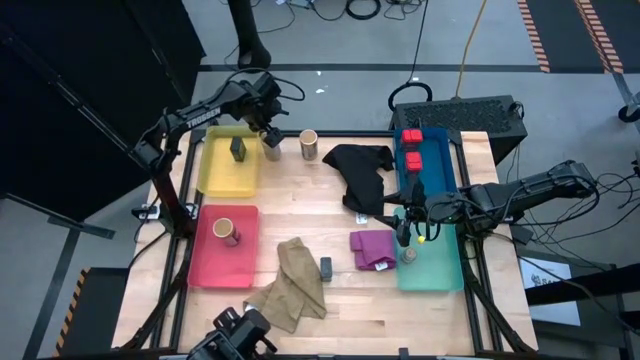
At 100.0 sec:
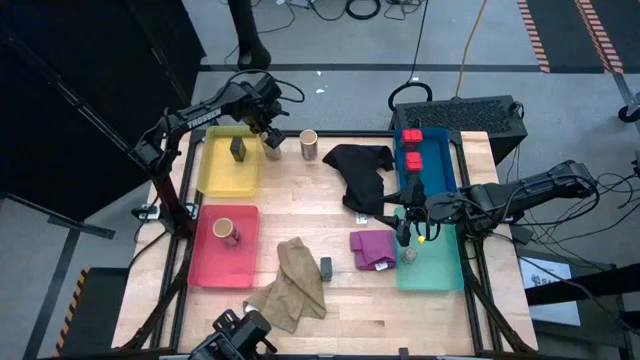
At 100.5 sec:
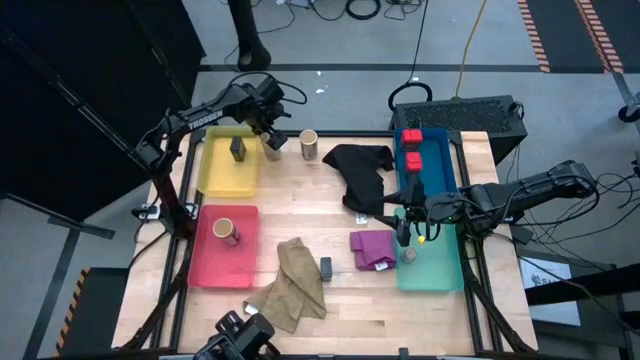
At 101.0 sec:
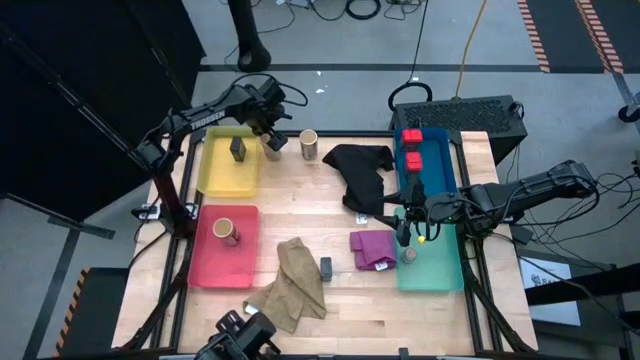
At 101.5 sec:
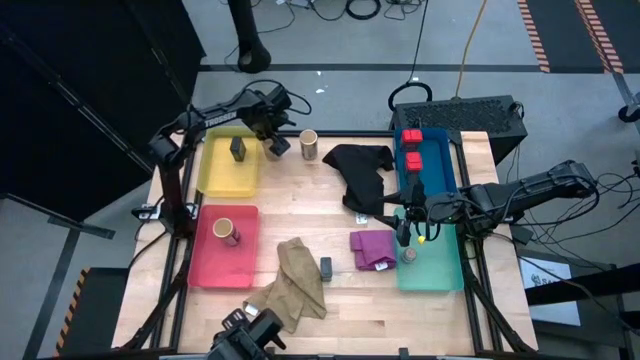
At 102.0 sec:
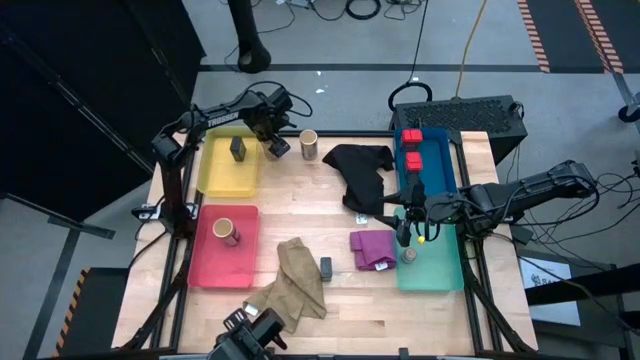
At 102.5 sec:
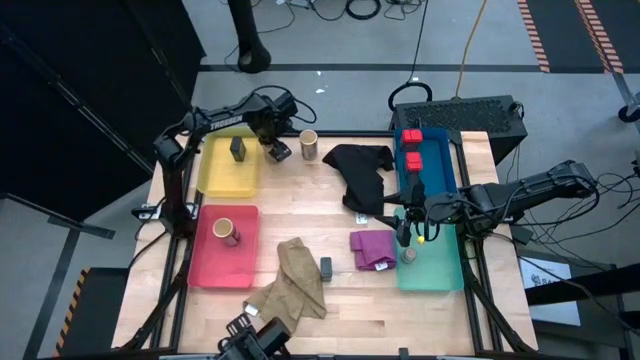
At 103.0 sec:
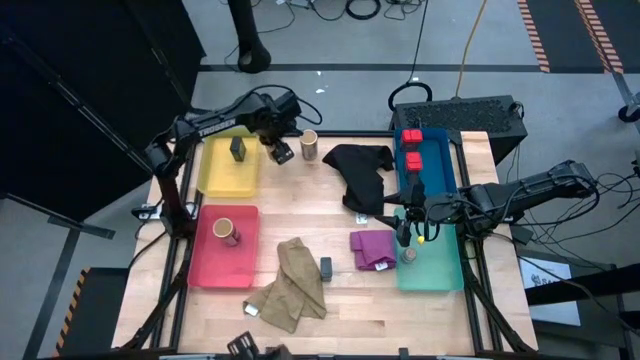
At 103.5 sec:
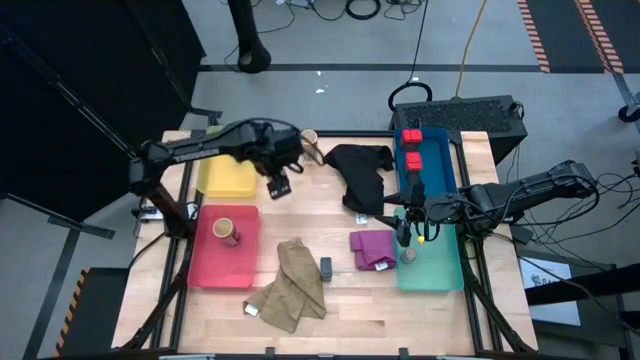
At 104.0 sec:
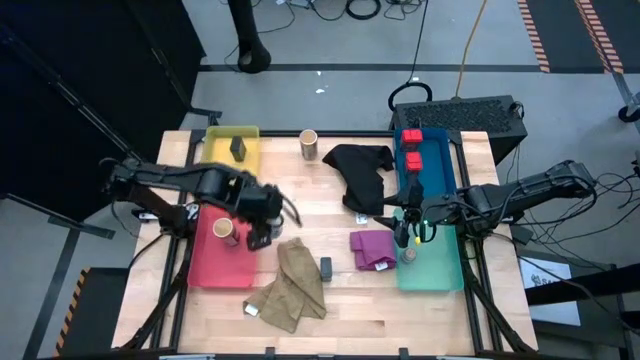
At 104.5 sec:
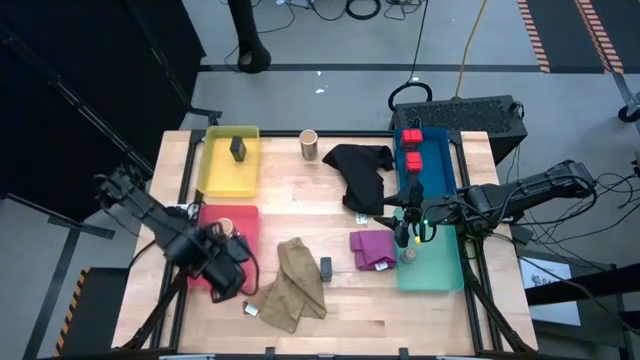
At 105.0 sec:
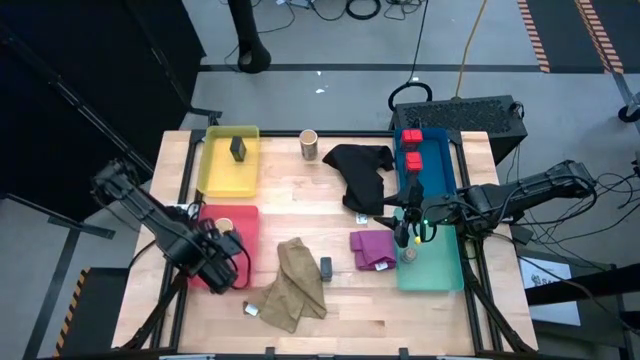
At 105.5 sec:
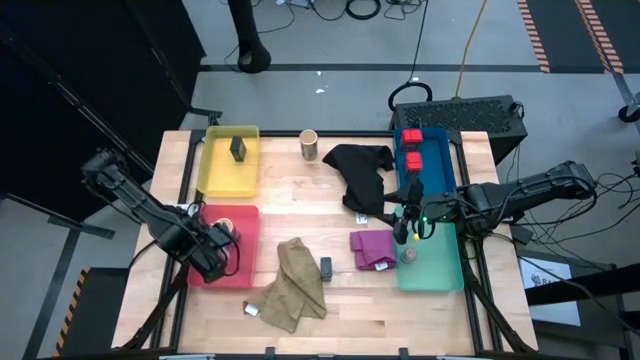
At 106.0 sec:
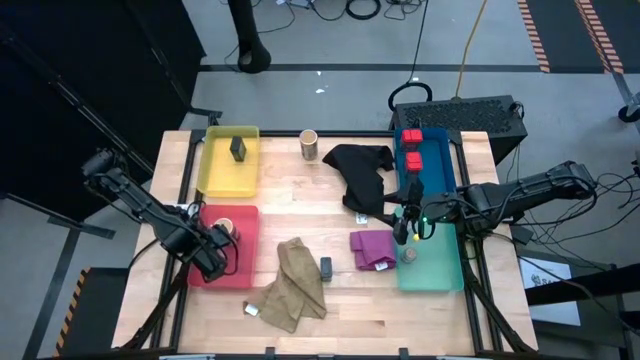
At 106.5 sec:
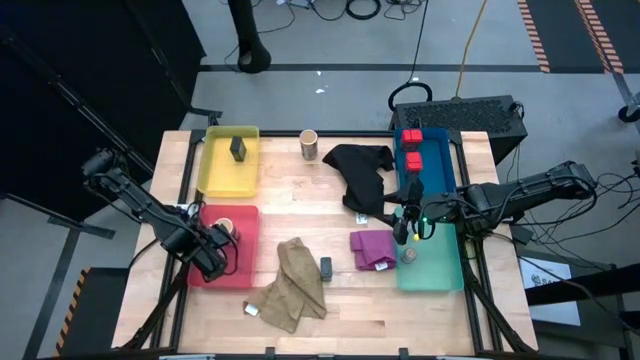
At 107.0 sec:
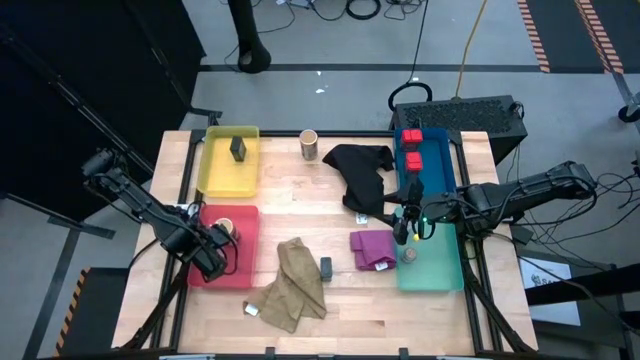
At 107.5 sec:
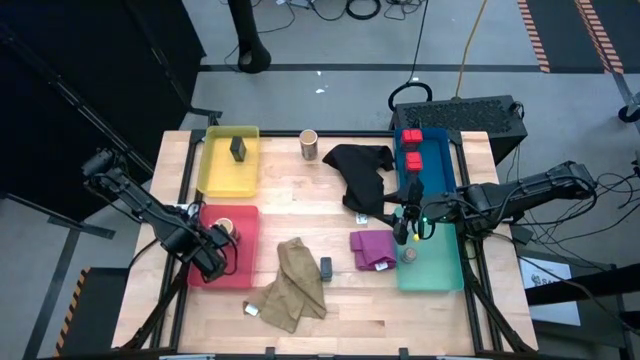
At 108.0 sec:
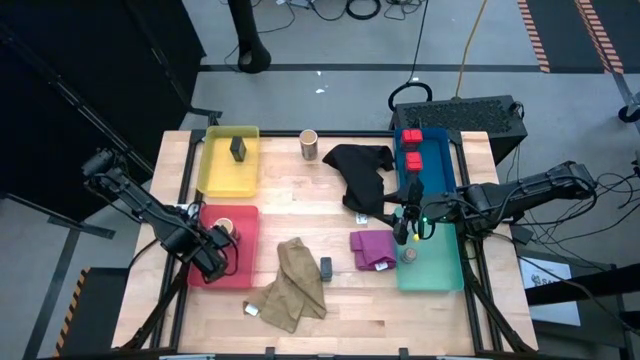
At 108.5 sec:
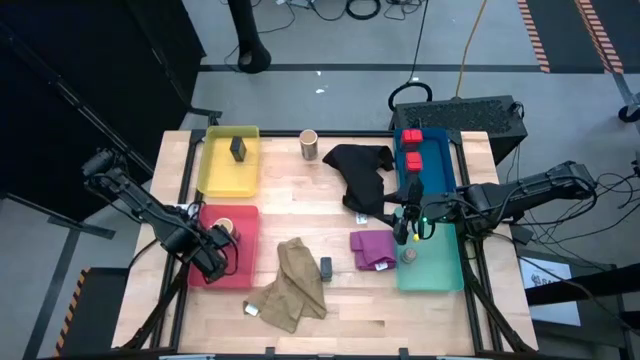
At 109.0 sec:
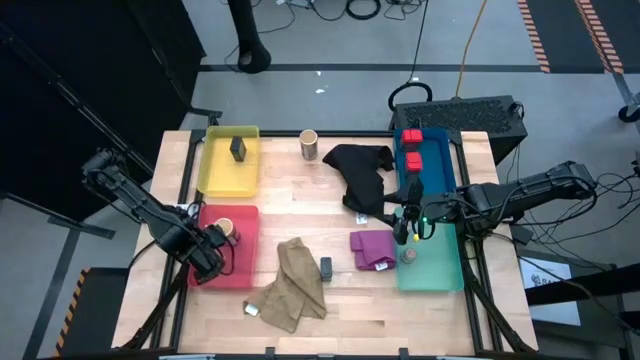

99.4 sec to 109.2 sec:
Task: Sort spices by type
Put the left gold seasoning bottle into the red bin

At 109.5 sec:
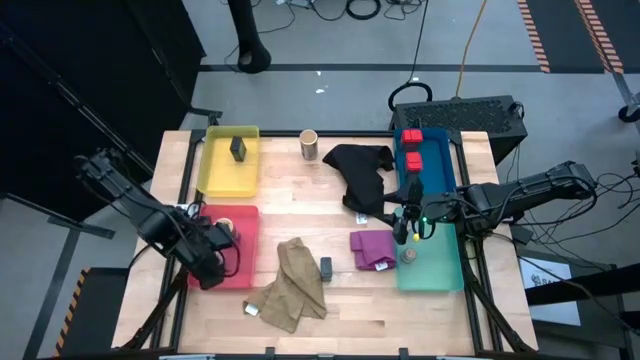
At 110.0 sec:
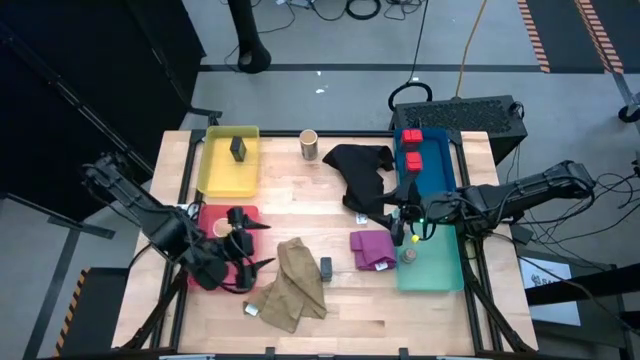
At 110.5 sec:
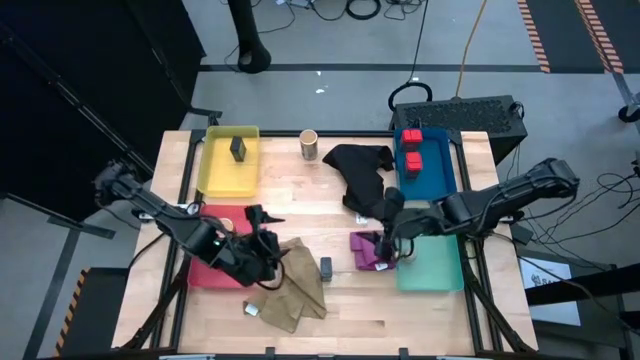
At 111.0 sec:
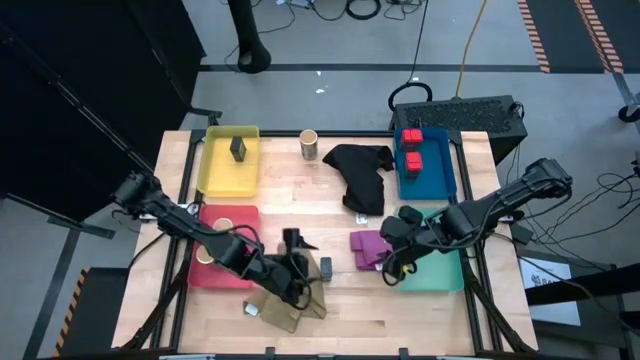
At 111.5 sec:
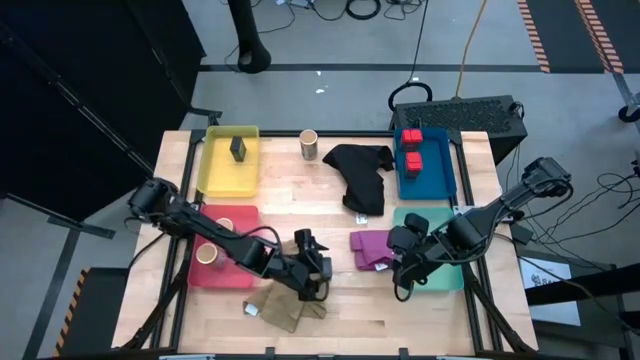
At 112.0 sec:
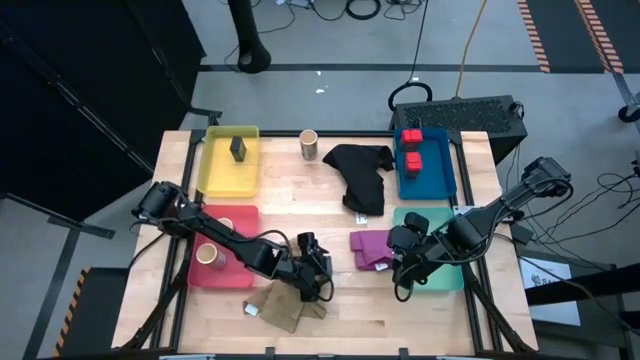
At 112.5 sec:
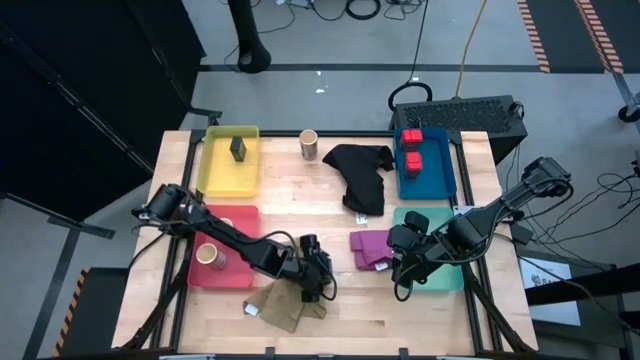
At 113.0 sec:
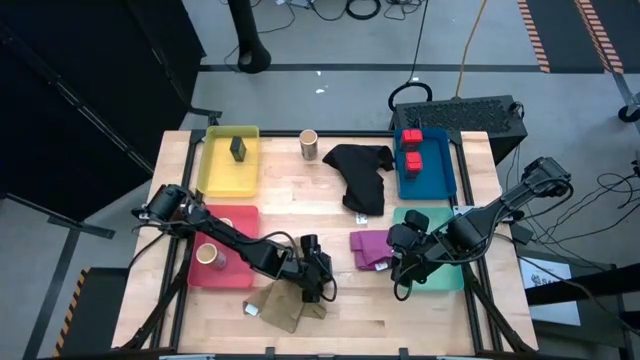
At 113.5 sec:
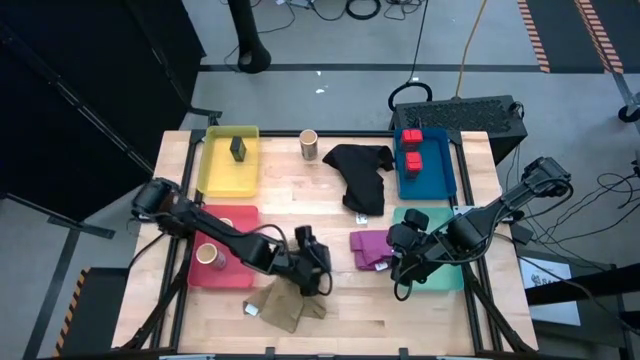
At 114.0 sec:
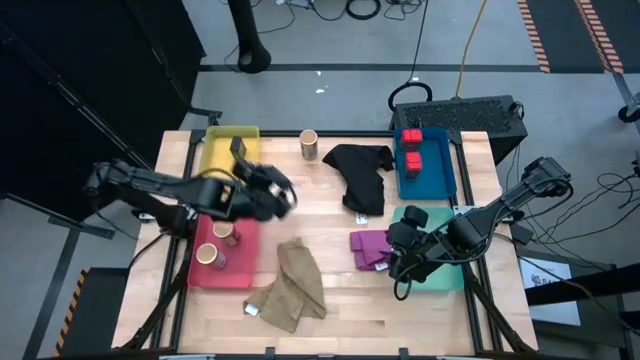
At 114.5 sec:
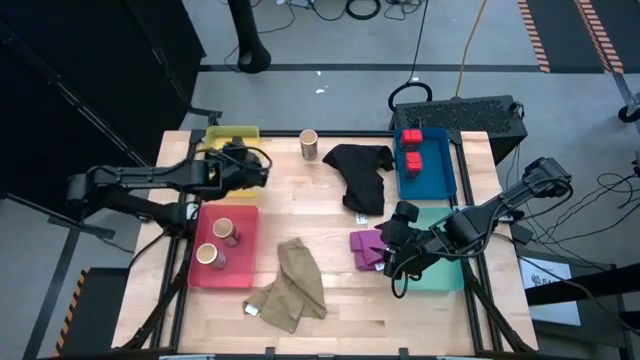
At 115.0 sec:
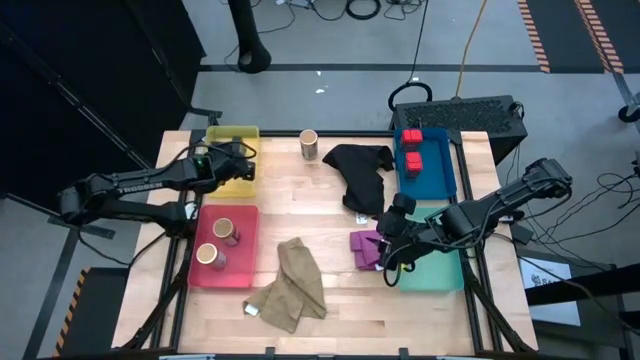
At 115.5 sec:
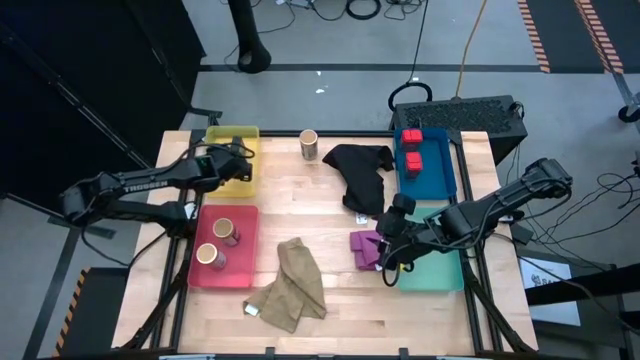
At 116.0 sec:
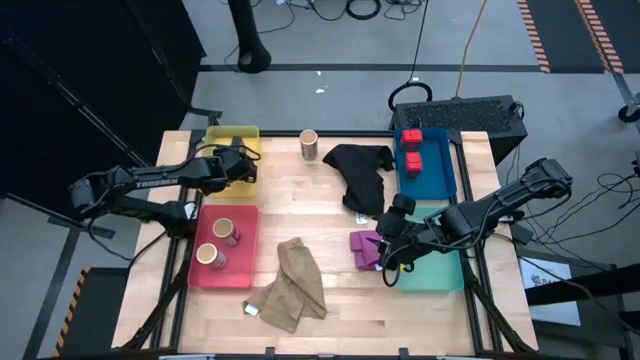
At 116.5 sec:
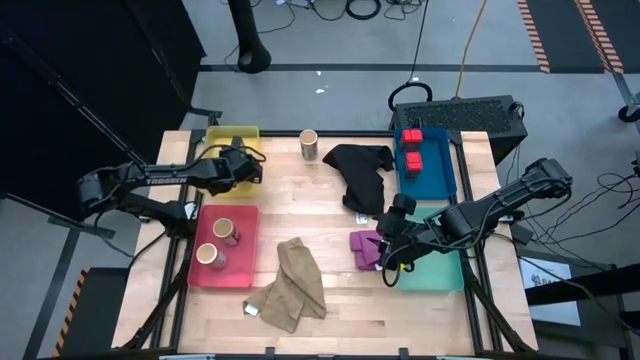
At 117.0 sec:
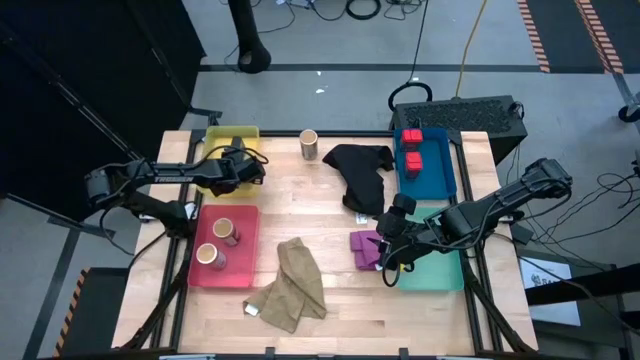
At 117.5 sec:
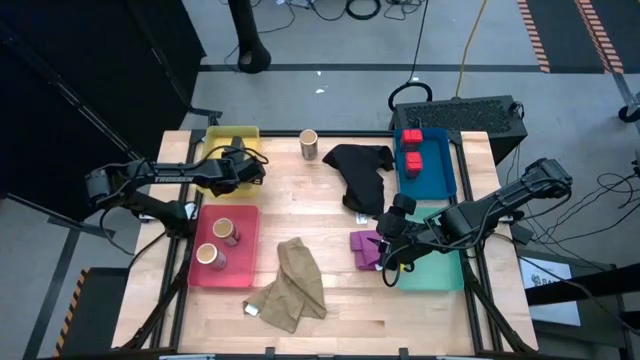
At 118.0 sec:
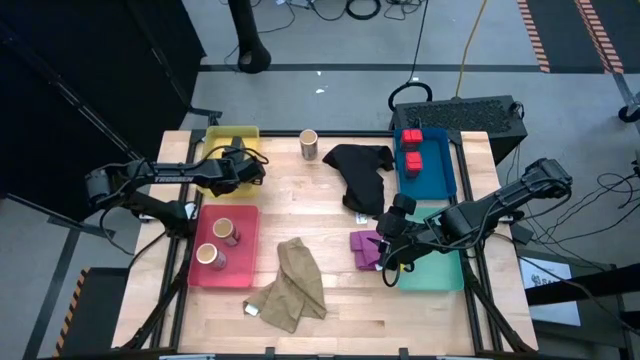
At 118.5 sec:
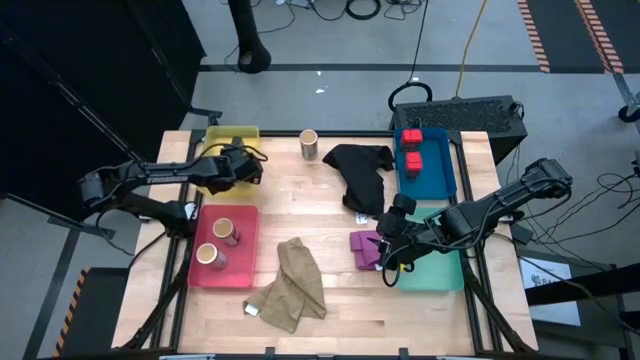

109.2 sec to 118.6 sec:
Put the black seasoning can into the yellow bin
